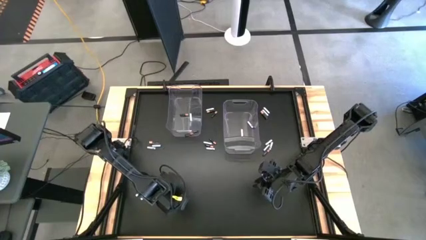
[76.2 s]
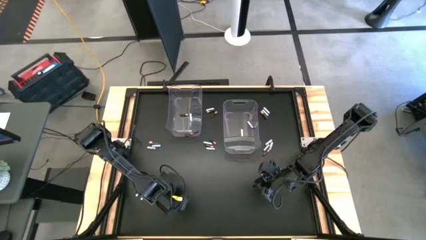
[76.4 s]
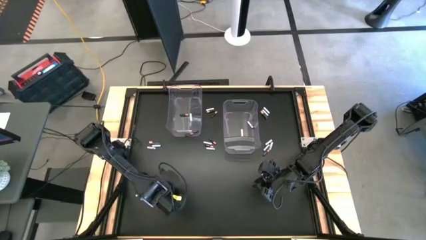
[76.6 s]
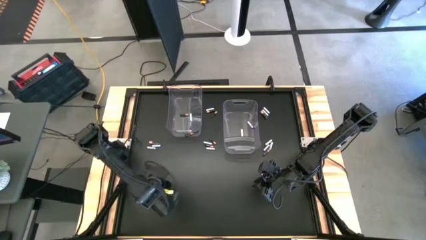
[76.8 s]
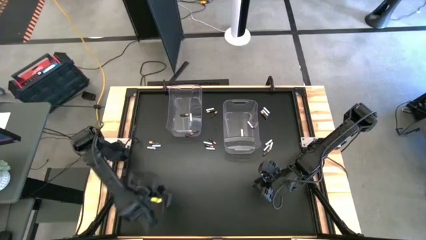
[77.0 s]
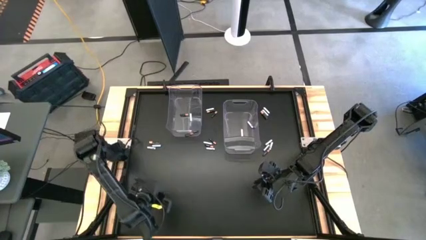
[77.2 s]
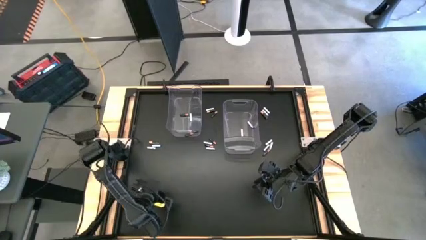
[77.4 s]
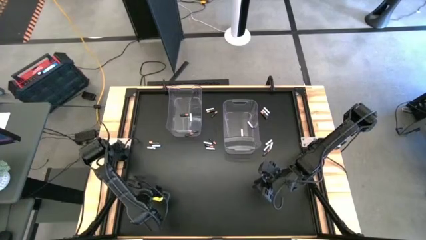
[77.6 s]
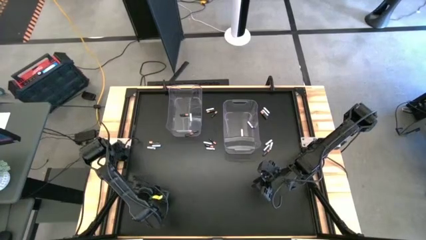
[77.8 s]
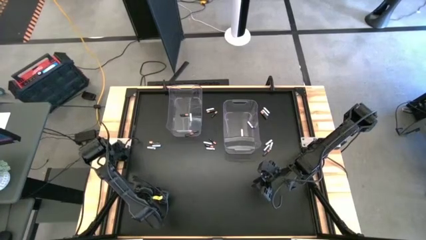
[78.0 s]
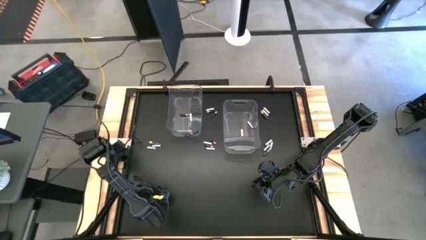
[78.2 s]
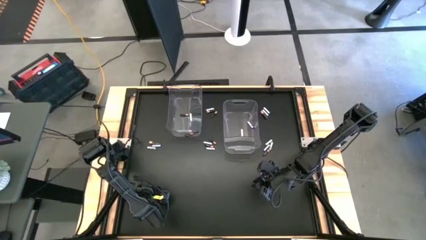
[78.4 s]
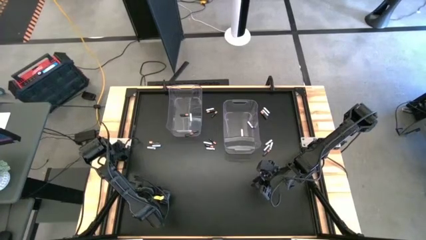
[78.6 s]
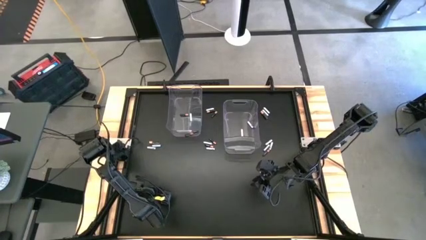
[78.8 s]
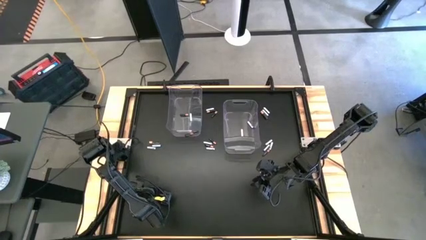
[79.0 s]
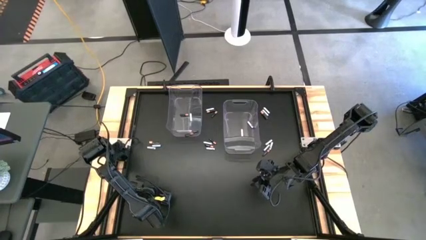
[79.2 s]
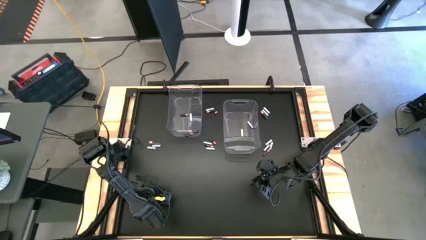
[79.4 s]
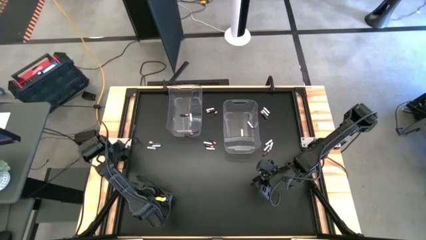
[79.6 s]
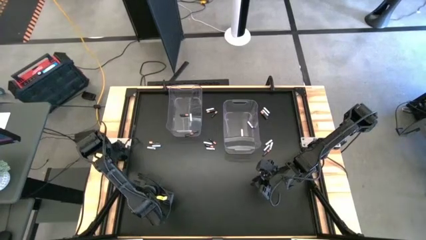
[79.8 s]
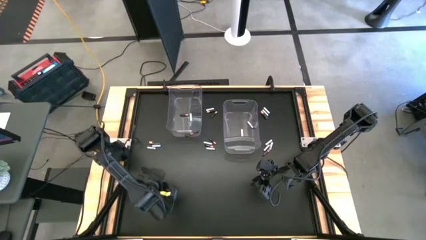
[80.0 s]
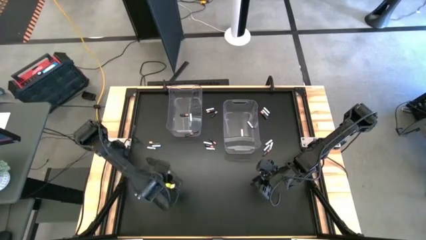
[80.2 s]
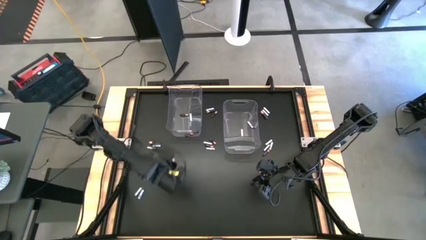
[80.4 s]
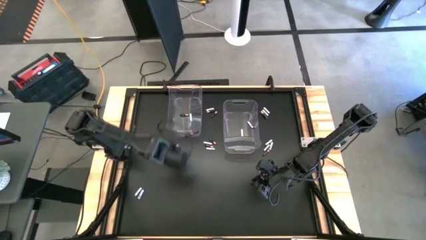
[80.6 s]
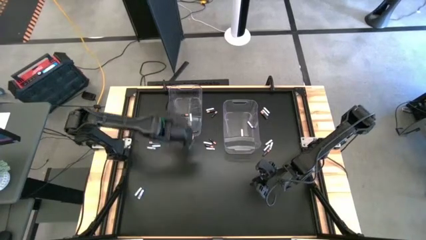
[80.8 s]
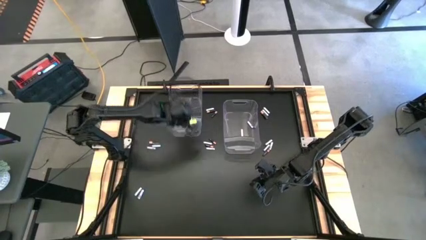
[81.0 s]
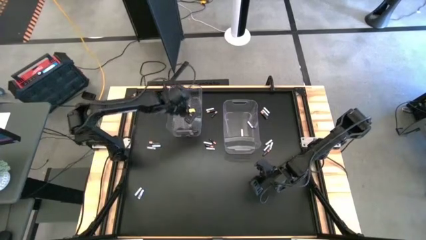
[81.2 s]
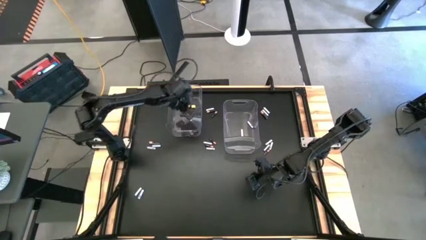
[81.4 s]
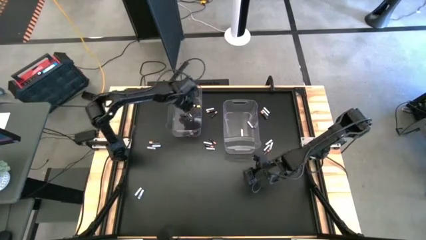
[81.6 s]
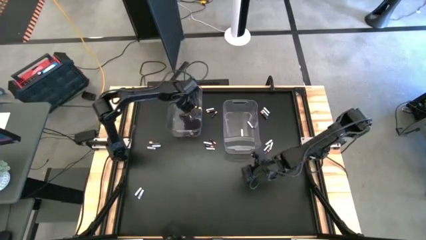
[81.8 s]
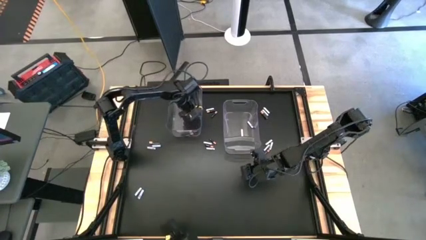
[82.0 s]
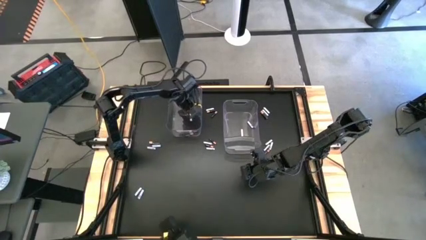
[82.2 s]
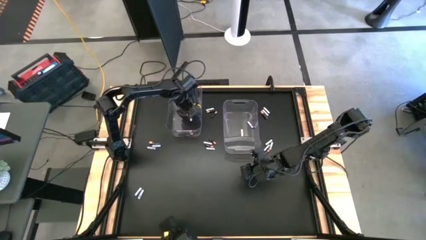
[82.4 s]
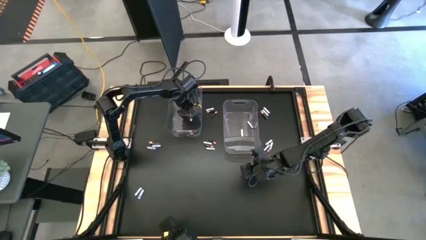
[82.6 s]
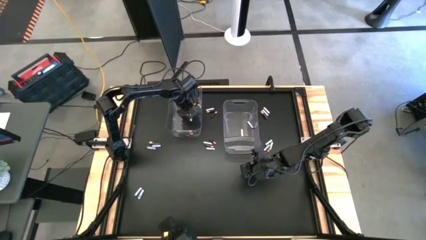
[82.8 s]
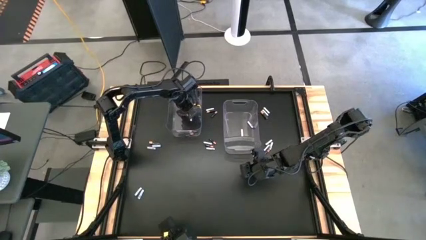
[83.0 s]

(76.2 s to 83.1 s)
Task: Sort batteries
Put the black battery into the left transparent bin

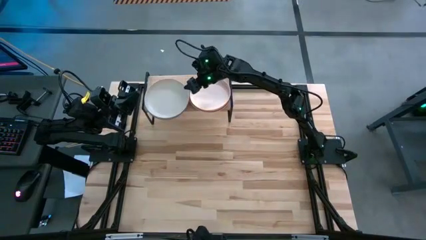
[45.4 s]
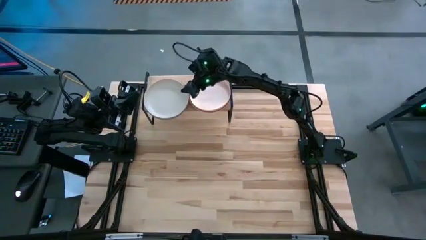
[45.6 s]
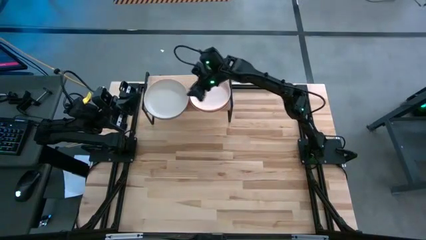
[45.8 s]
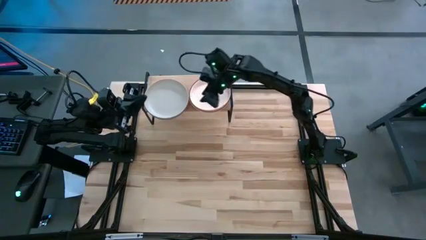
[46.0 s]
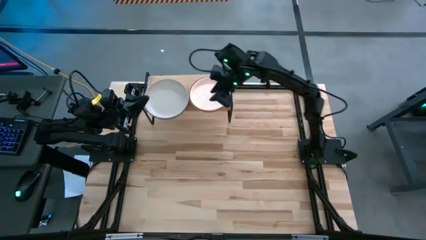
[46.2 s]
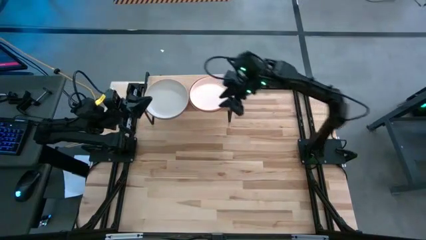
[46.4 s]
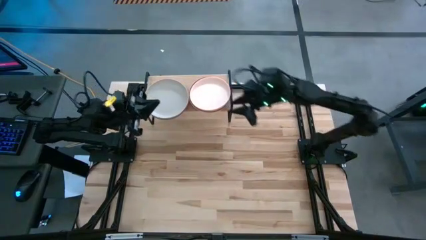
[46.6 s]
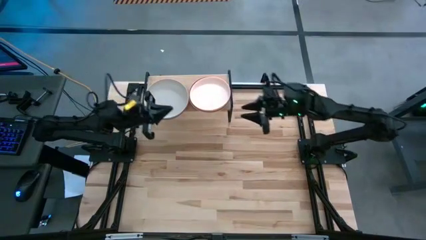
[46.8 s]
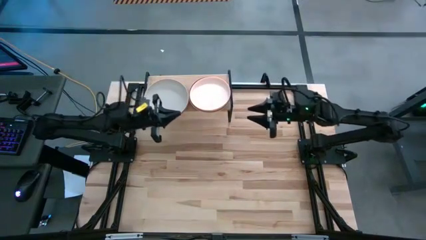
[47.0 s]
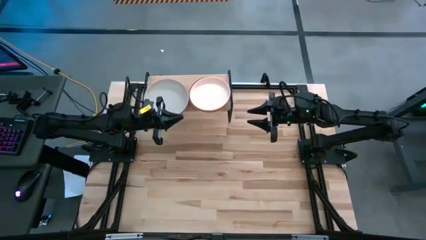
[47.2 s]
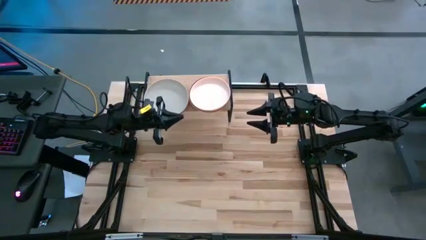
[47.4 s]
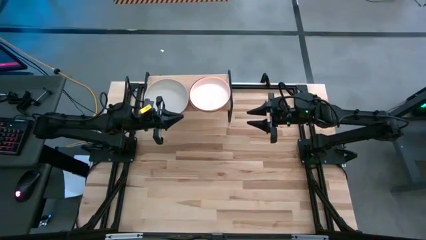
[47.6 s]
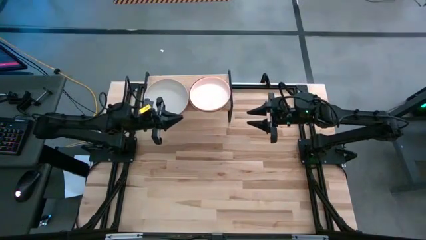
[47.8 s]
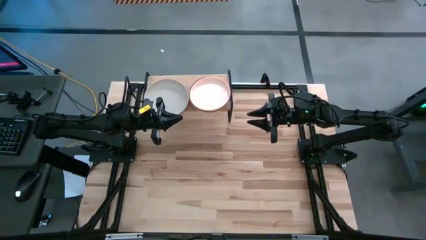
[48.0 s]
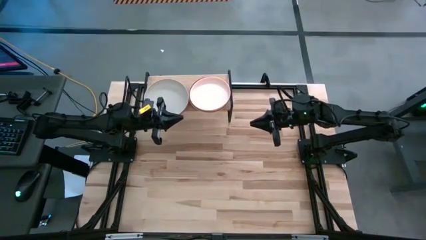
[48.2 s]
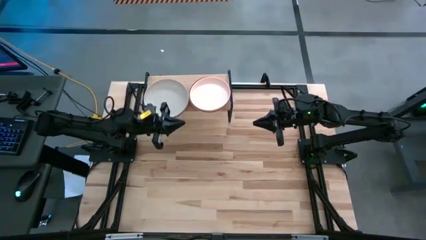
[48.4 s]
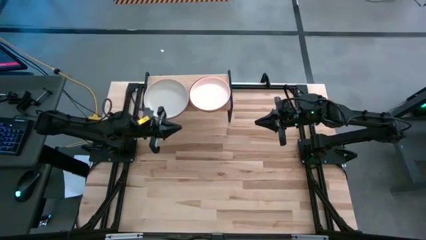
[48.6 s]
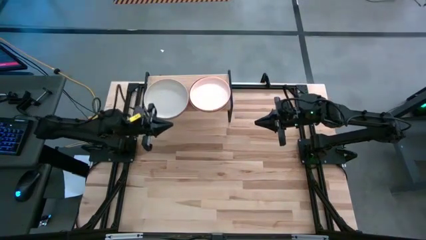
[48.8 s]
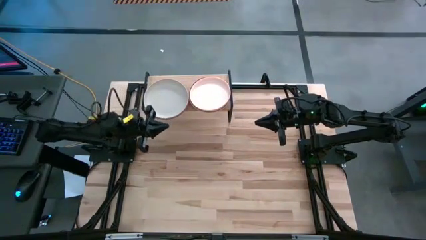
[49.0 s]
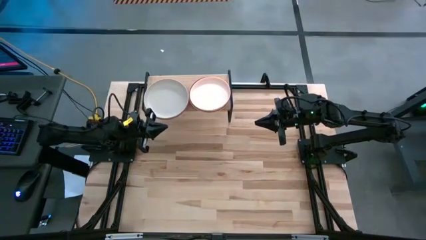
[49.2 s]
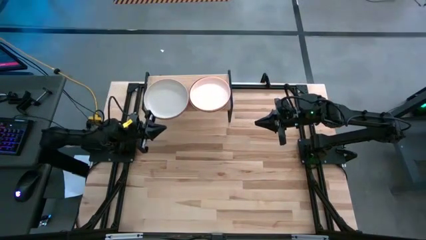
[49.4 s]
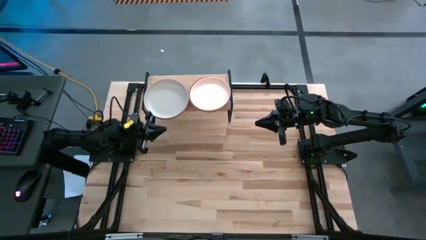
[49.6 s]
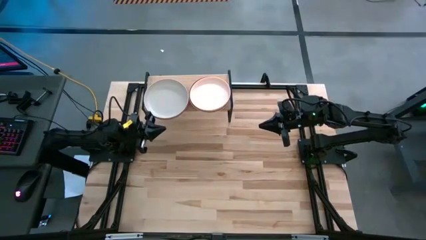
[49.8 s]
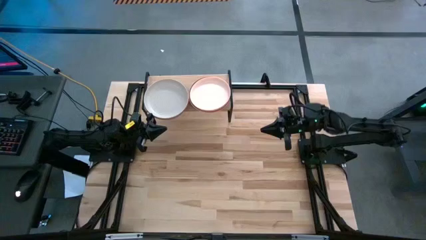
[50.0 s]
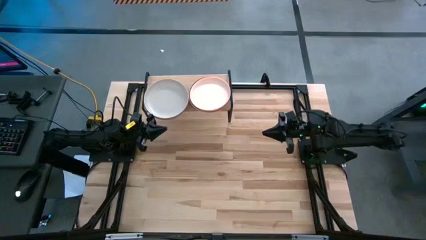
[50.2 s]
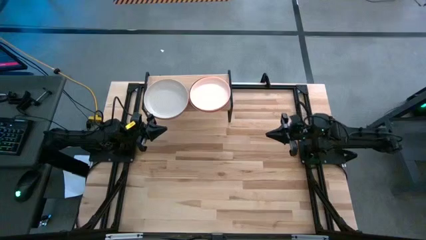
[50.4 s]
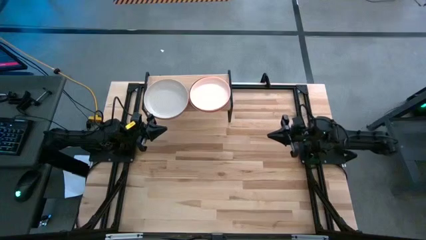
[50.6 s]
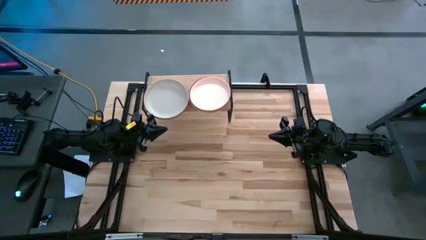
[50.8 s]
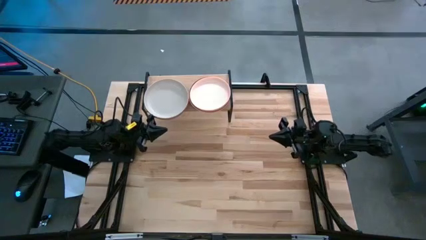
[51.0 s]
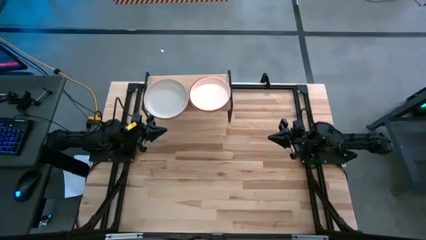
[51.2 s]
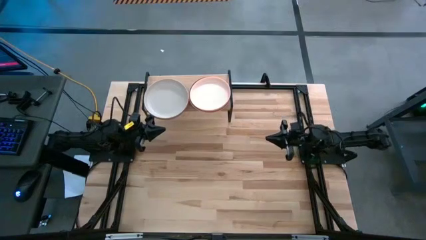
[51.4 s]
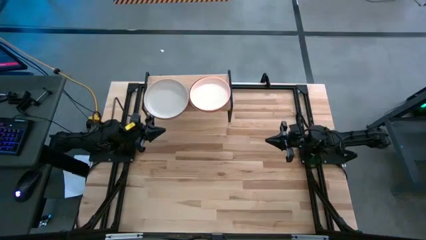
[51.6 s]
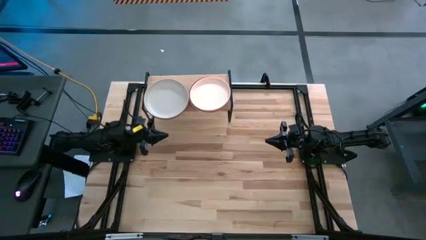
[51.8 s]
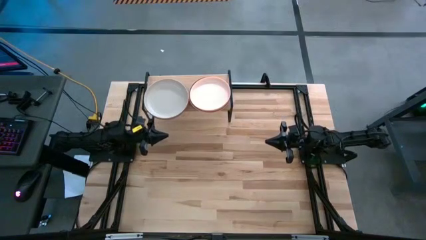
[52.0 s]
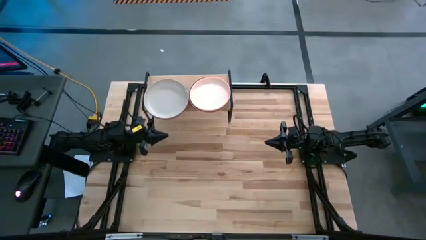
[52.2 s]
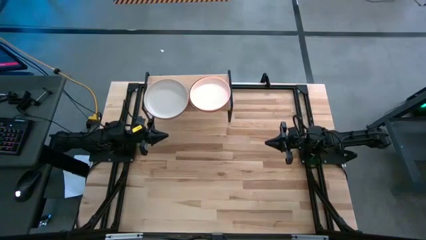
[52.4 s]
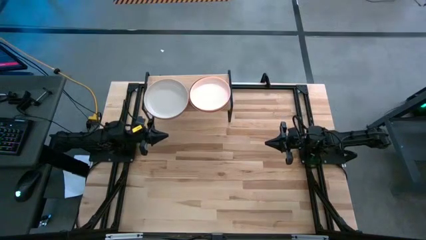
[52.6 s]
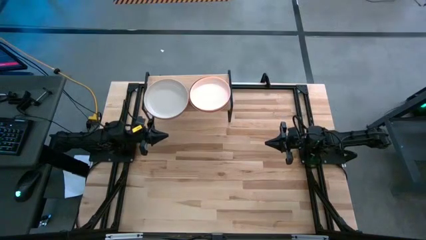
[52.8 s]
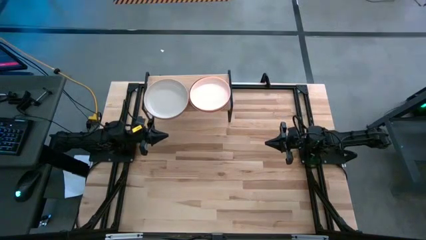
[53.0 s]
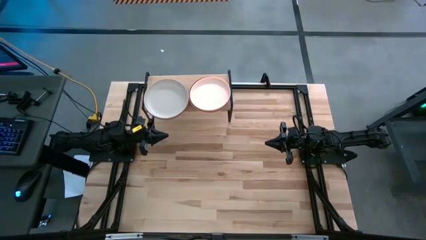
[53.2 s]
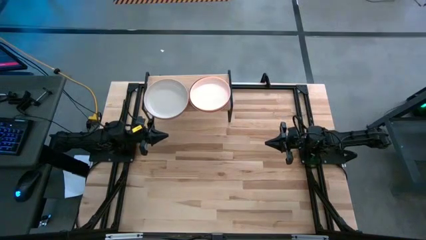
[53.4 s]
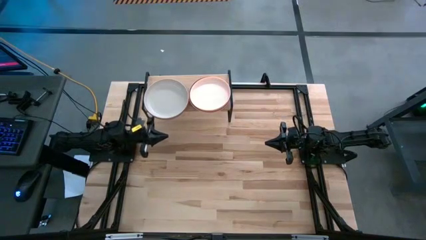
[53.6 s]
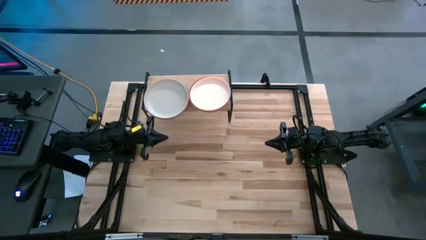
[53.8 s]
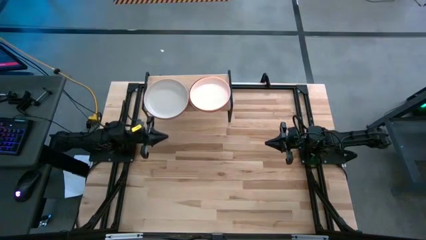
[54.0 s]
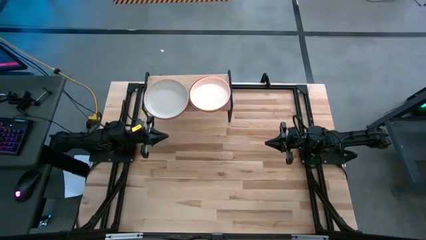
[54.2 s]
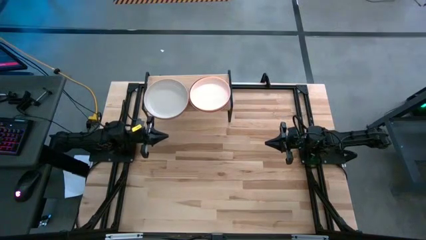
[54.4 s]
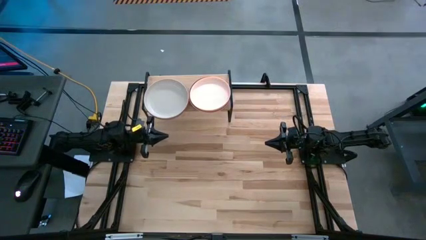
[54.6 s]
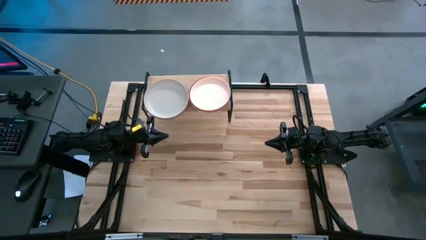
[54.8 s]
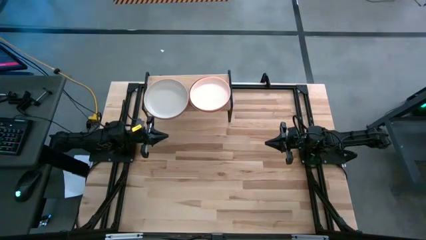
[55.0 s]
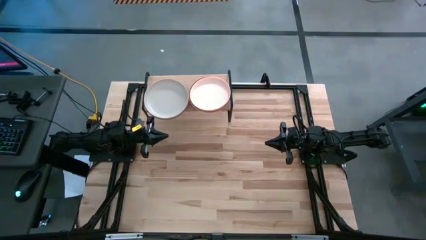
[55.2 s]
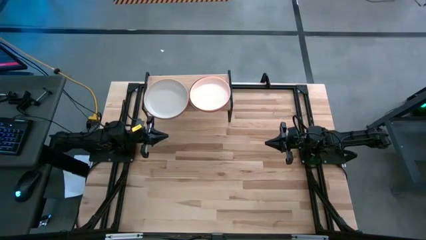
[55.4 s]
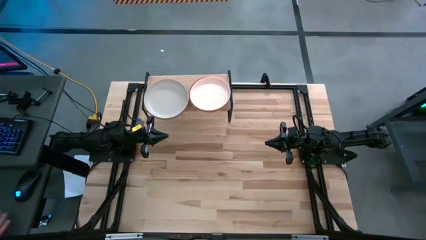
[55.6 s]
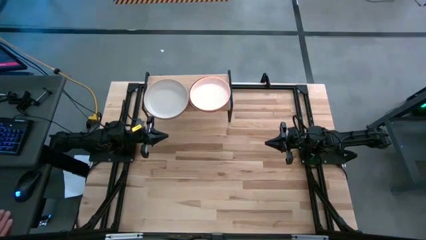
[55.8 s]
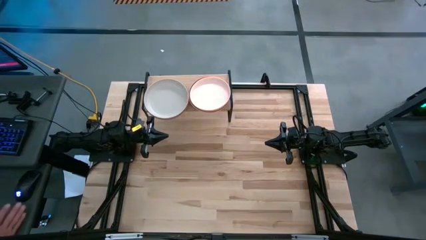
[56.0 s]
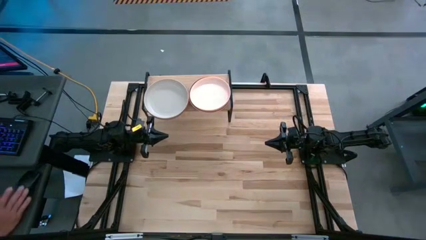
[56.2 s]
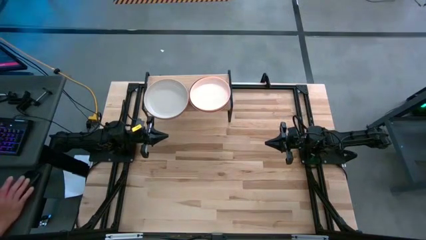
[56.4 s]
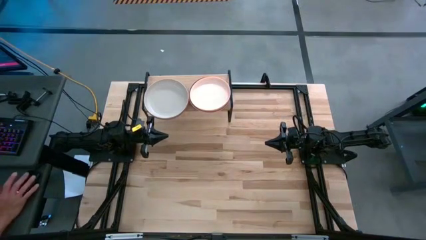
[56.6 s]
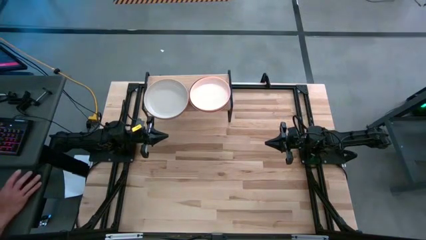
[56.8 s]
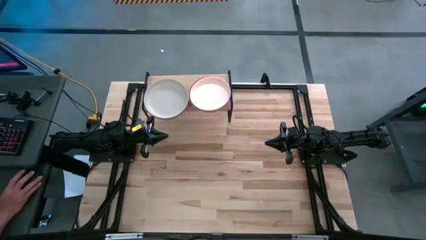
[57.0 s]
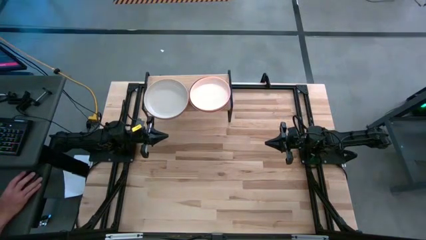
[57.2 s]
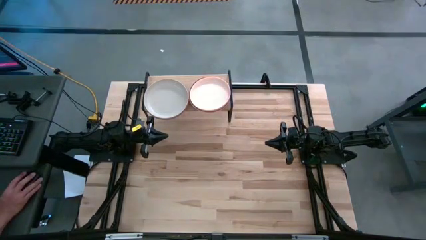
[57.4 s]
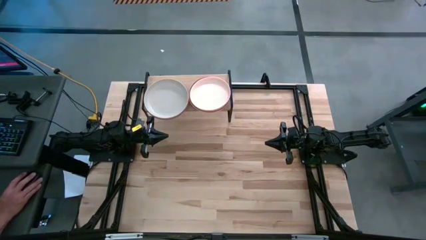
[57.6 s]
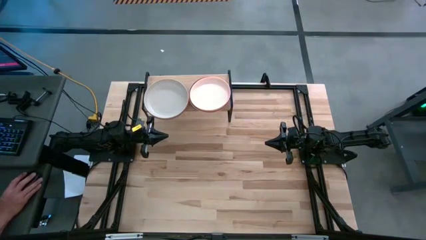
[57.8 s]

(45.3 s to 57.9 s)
Task: Place and stack plates onto a shelf
Return to Home Position
